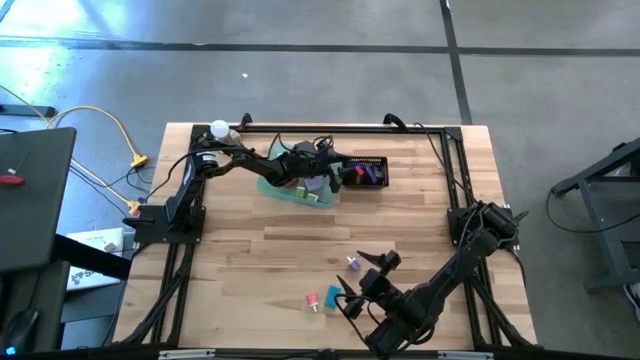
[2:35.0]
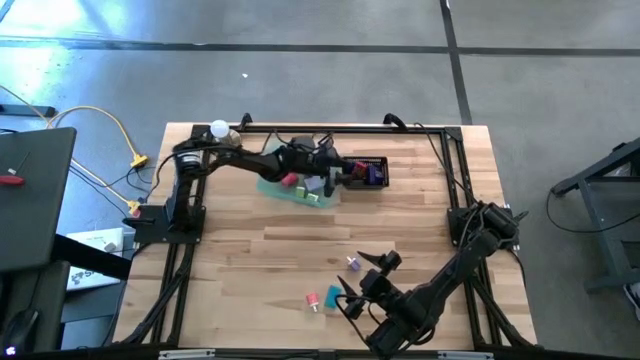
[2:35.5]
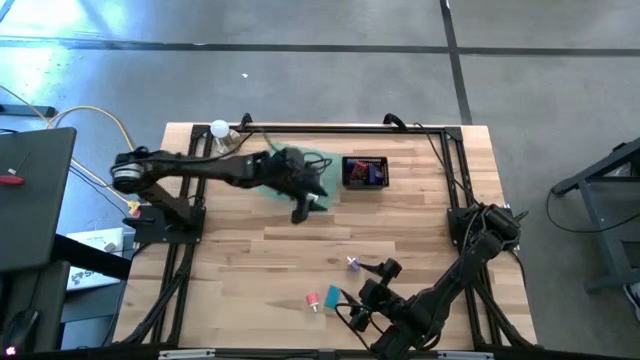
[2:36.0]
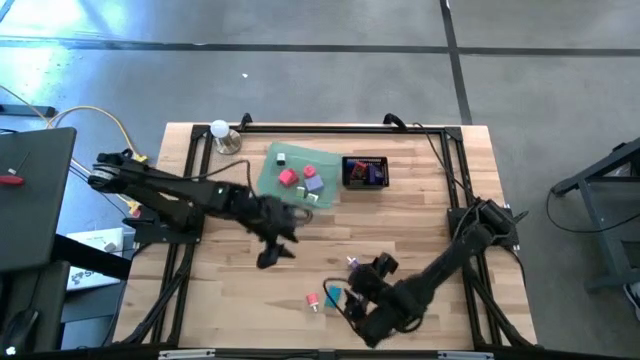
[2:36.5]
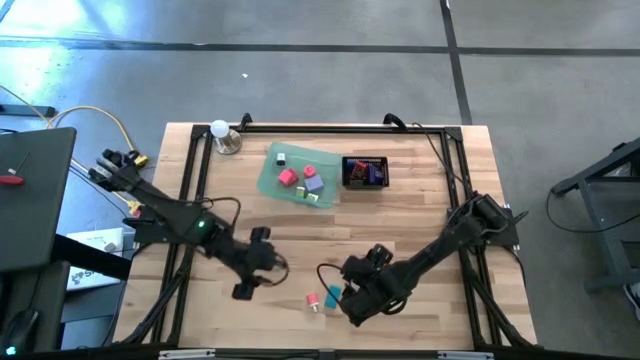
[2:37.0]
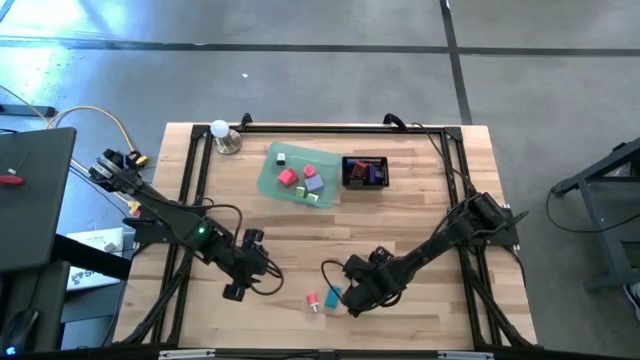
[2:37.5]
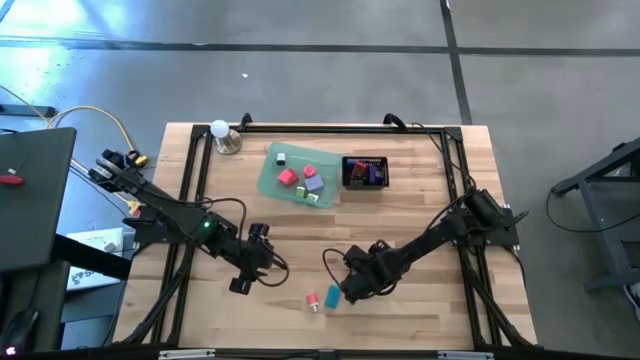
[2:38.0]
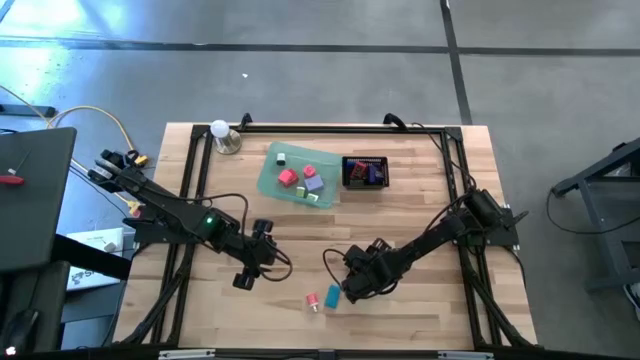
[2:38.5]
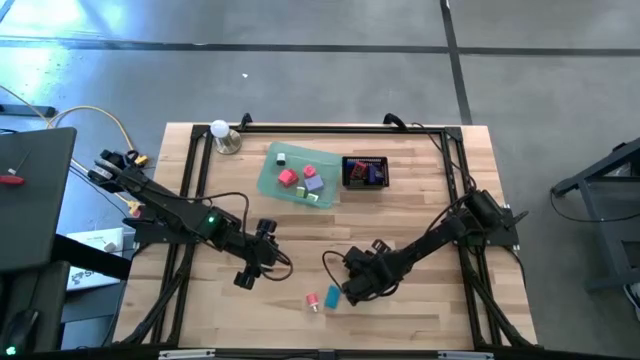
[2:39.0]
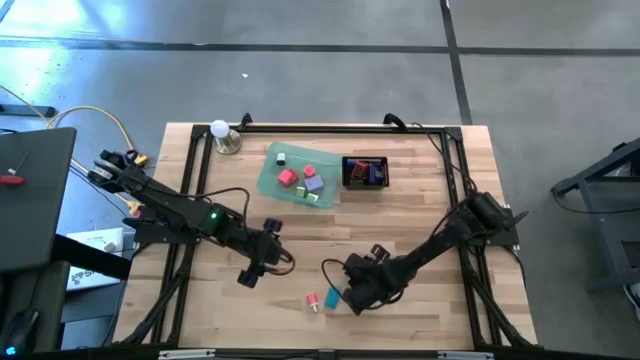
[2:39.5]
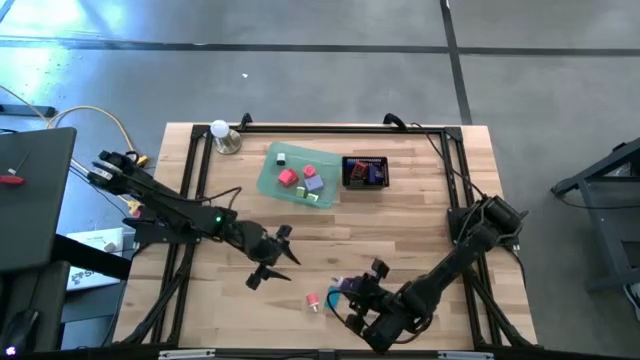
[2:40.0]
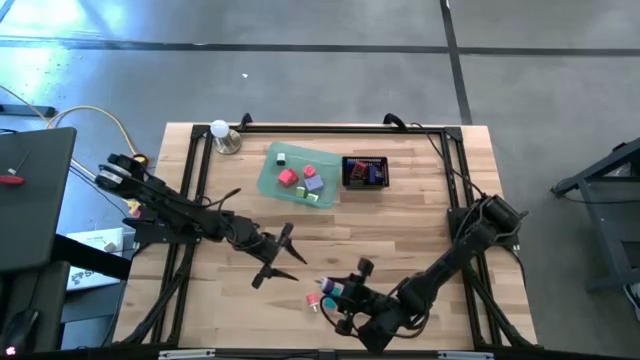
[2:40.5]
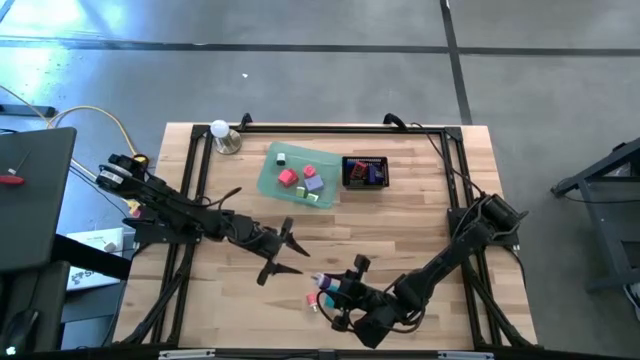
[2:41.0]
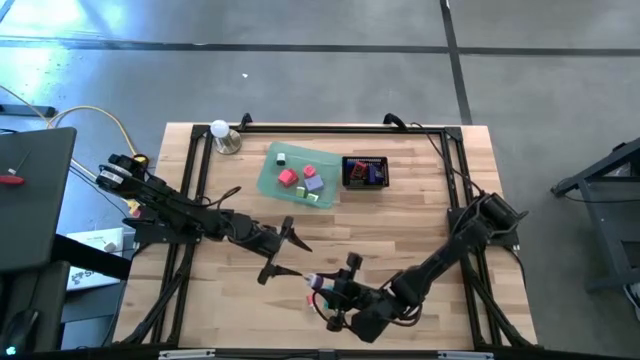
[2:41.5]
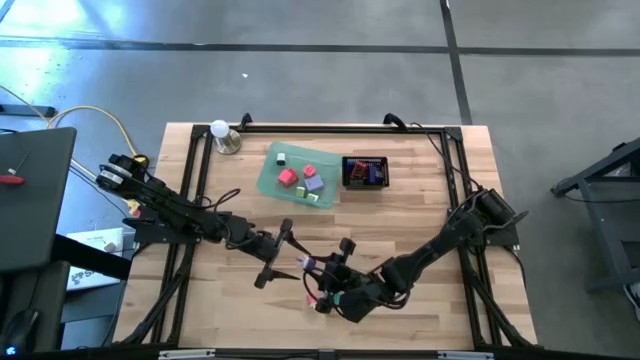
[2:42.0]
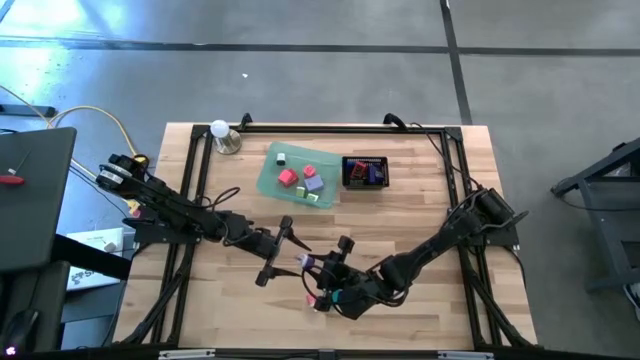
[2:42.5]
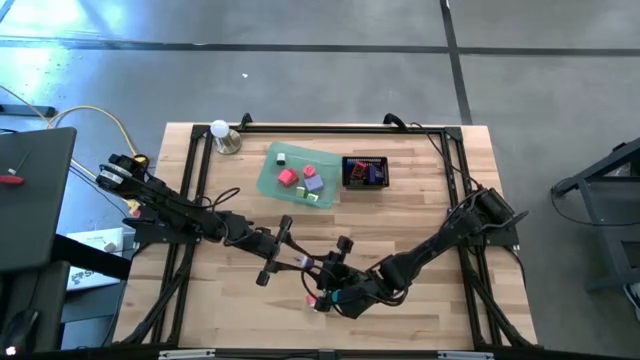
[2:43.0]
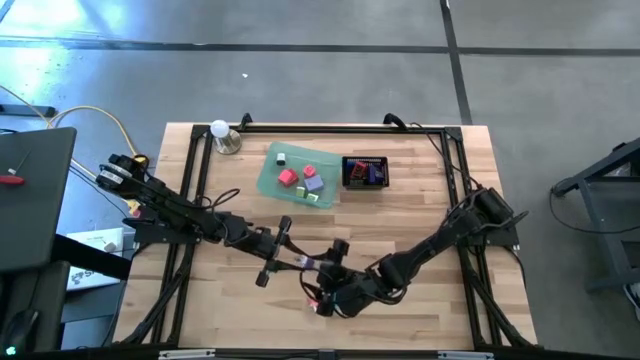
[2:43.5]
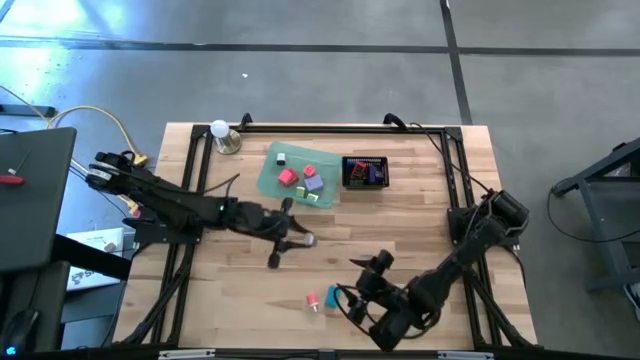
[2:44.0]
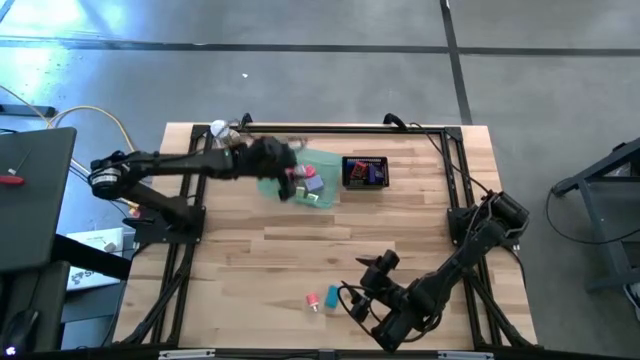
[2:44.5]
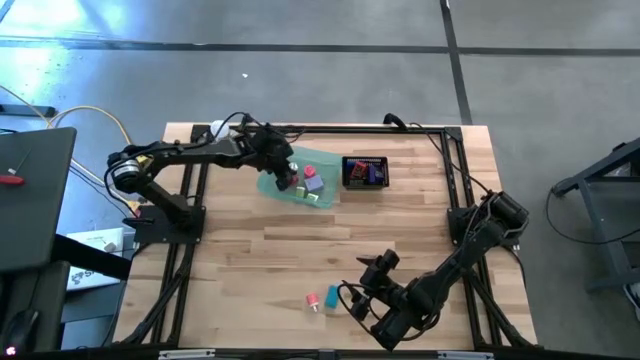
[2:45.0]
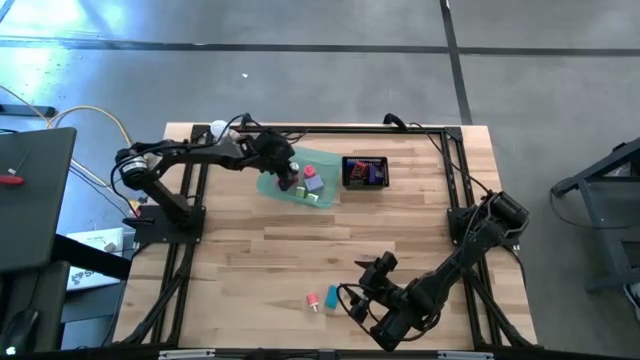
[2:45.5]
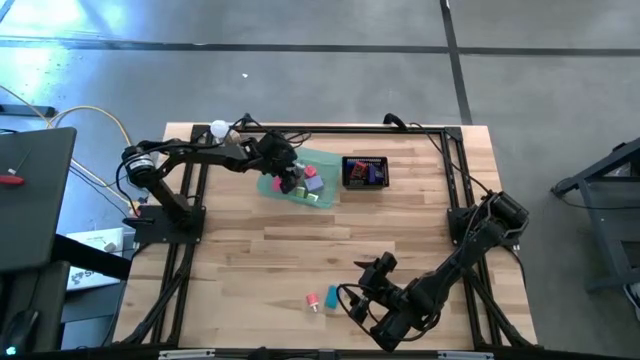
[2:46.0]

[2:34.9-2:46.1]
Task: Pick & Place Office items
Put the purple charger adapter into the green bin

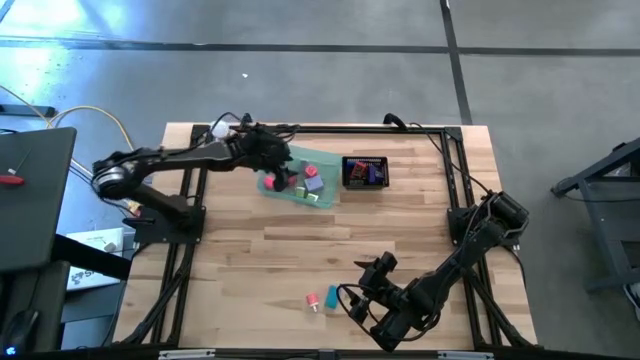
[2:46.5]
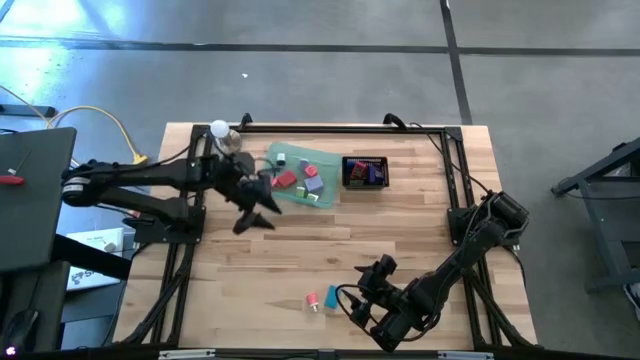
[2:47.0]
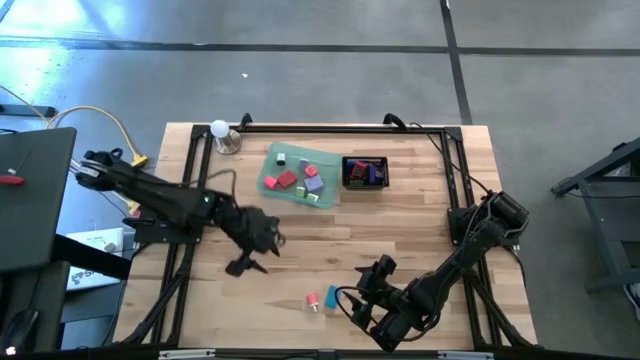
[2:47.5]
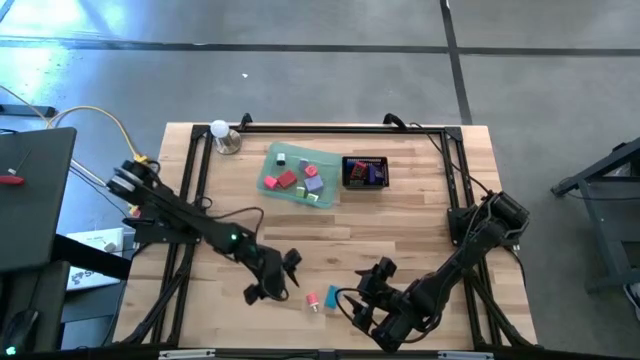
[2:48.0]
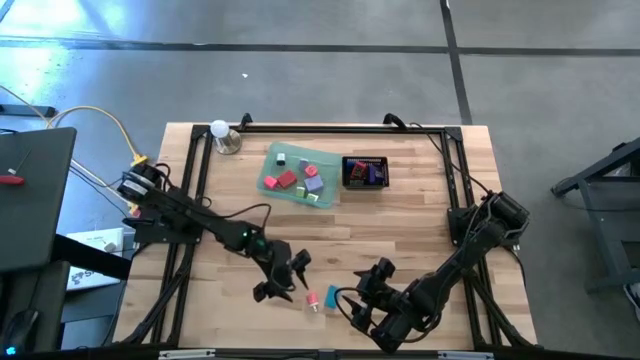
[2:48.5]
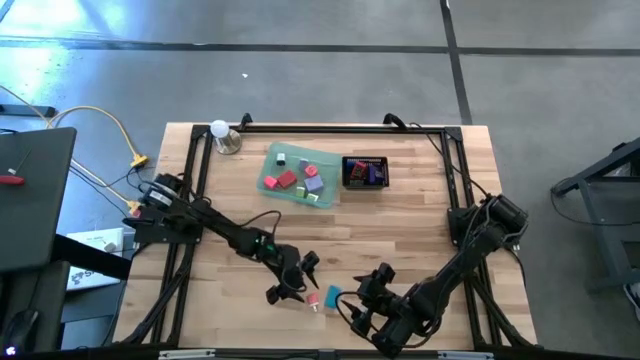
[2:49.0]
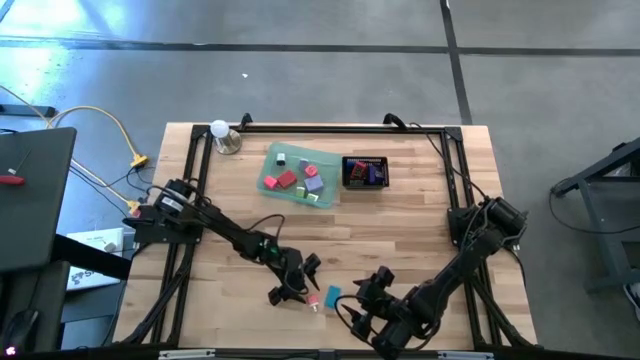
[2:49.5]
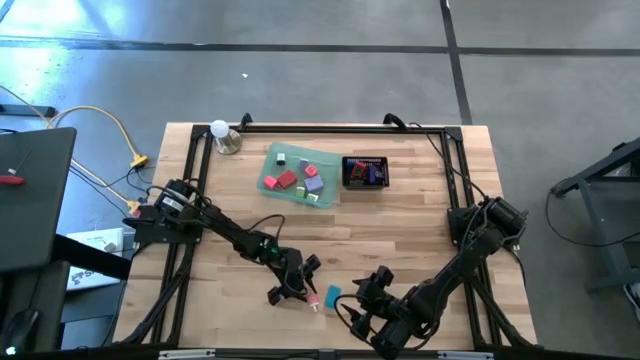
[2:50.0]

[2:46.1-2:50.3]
Put the pink white charger adapter into the green bin

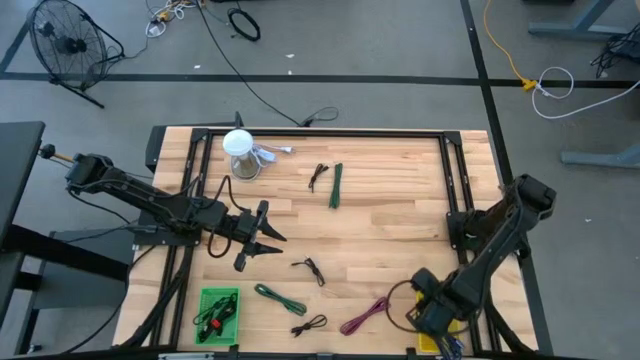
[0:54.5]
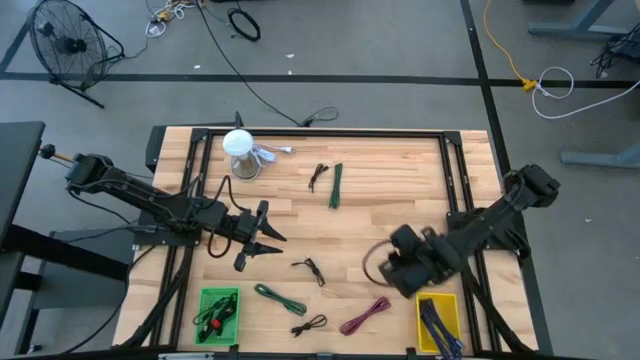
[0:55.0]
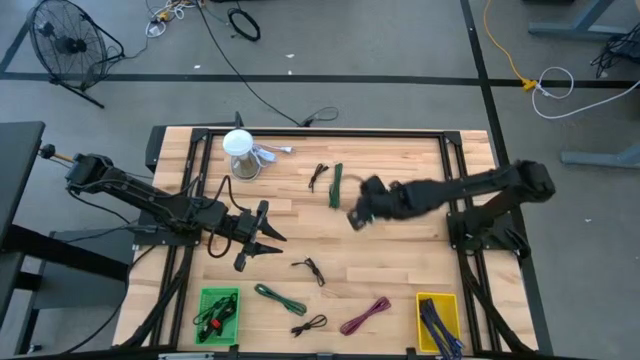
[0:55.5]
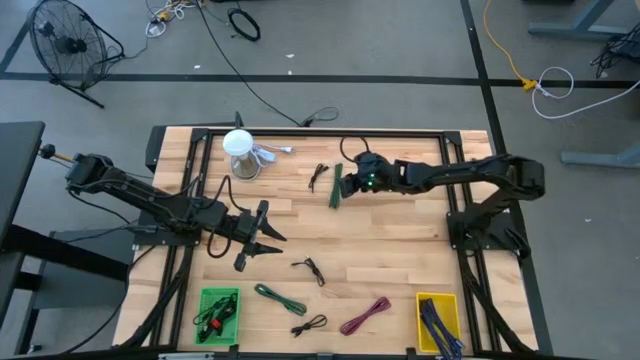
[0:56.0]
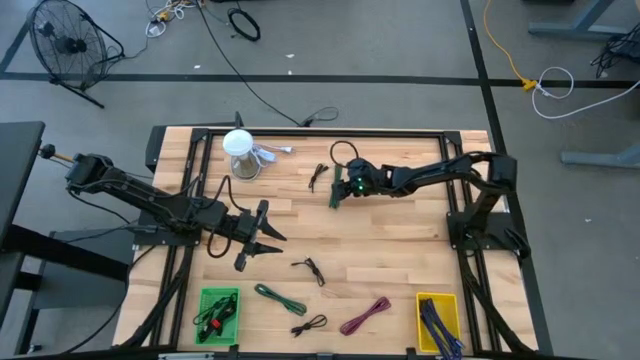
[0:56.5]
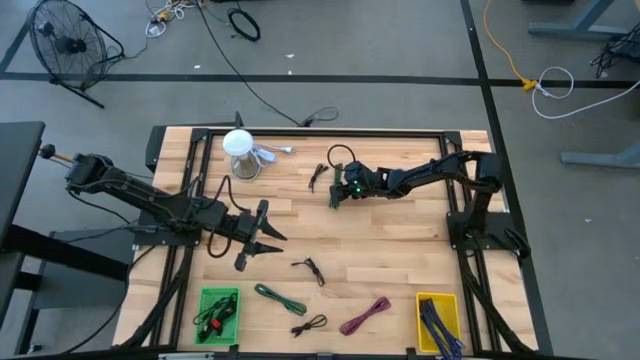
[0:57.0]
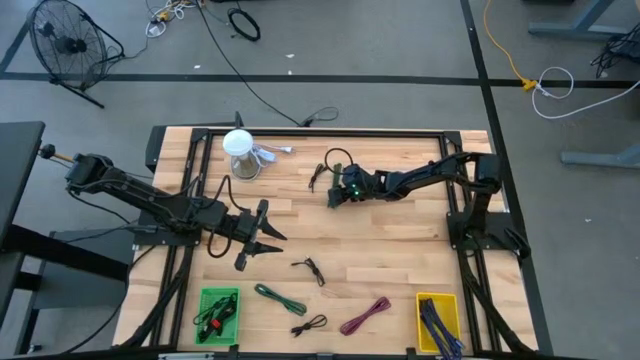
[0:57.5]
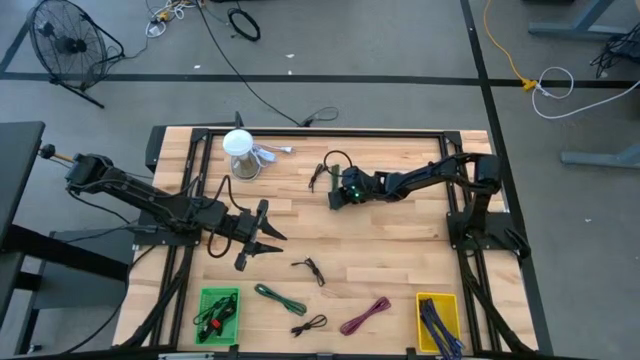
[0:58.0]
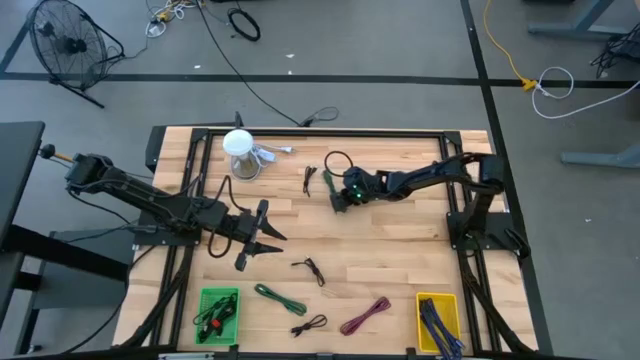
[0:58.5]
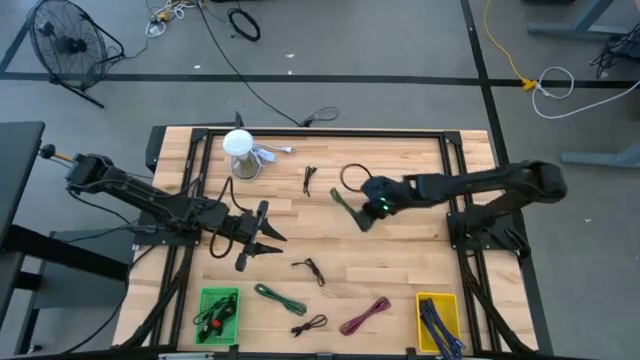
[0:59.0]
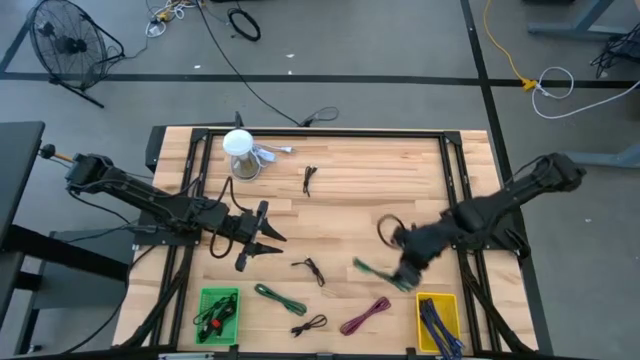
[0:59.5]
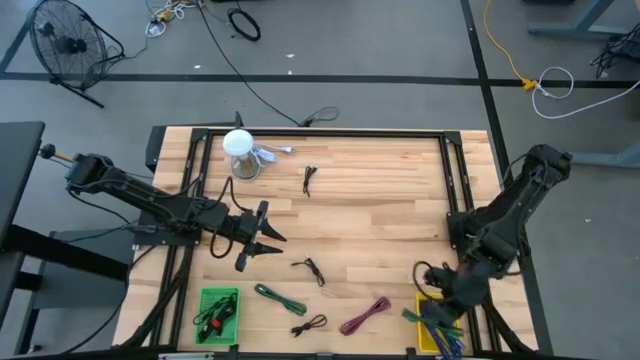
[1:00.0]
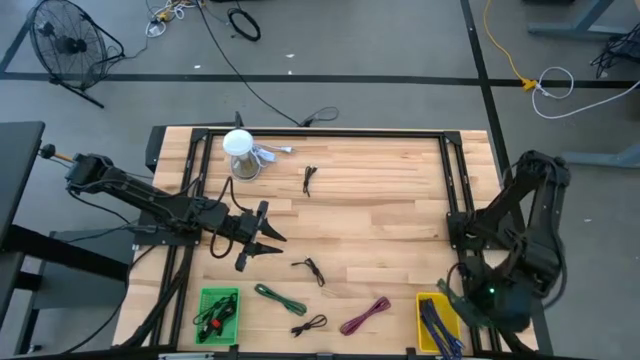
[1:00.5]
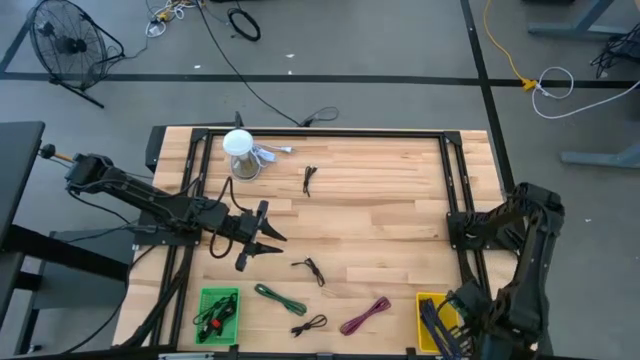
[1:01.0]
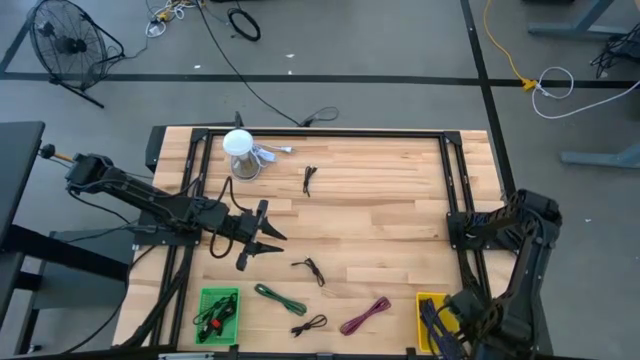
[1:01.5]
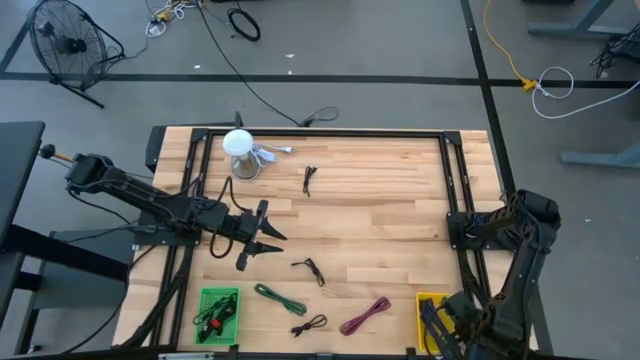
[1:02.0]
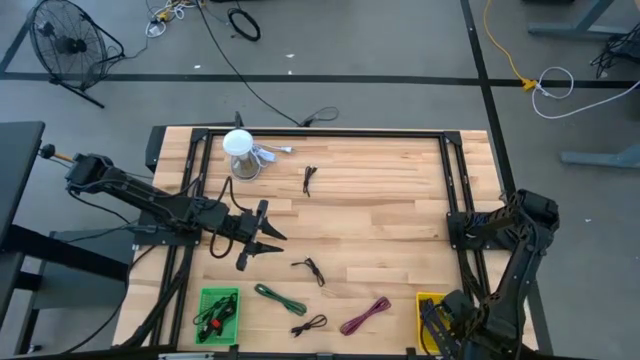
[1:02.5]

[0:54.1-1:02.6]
Task: Pick & Place USB Port
Put the black green charger cable into the yellow bin
